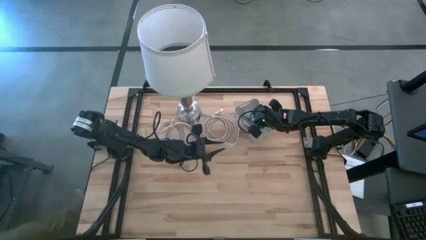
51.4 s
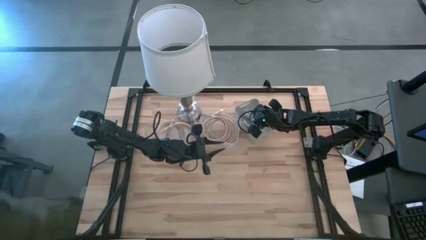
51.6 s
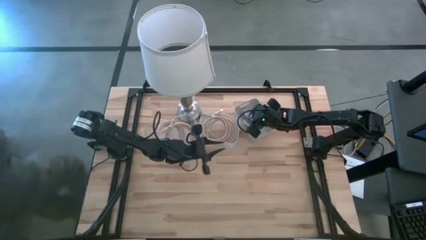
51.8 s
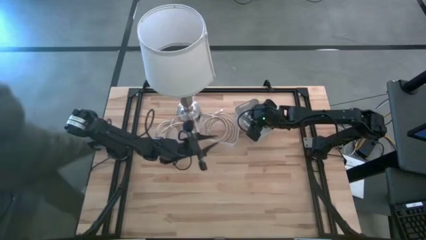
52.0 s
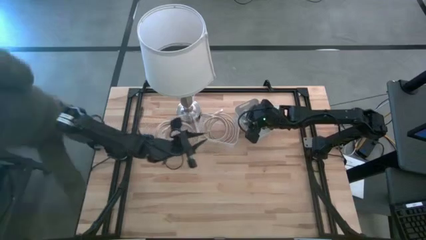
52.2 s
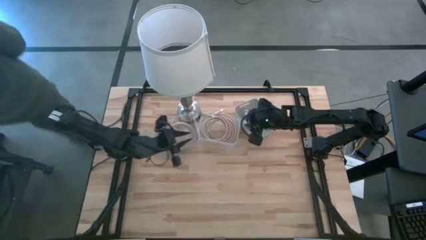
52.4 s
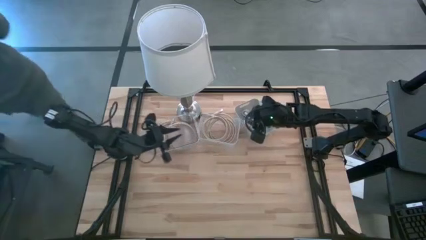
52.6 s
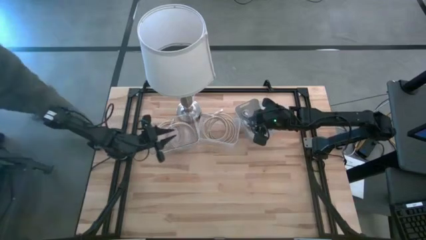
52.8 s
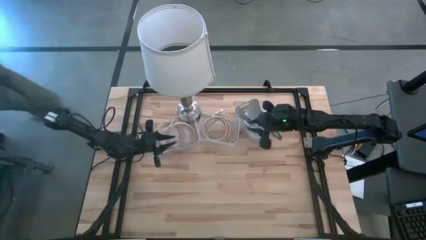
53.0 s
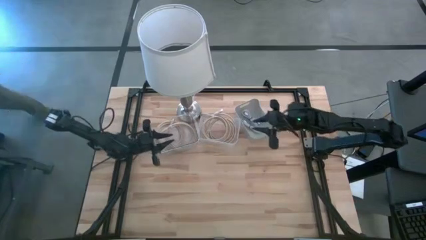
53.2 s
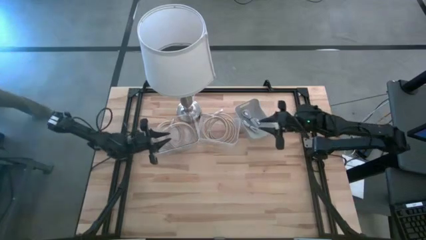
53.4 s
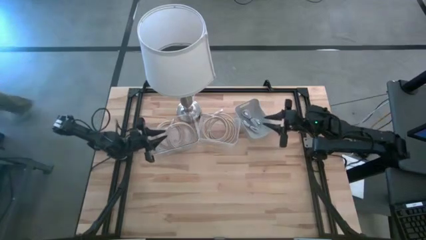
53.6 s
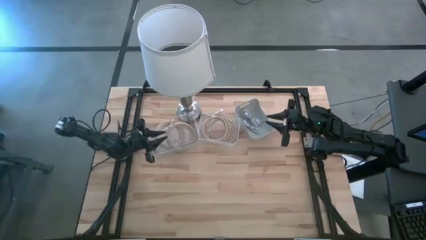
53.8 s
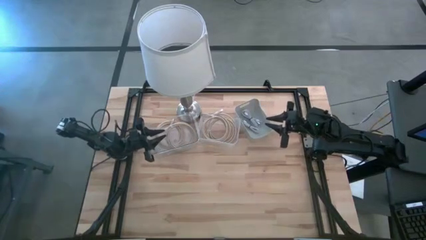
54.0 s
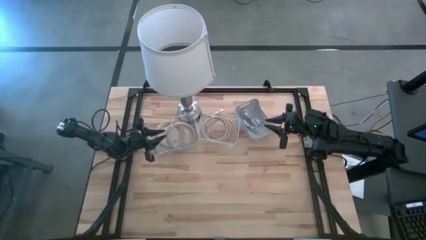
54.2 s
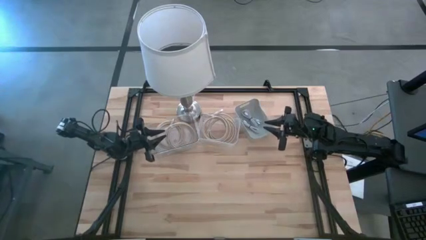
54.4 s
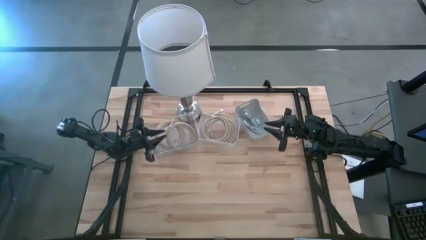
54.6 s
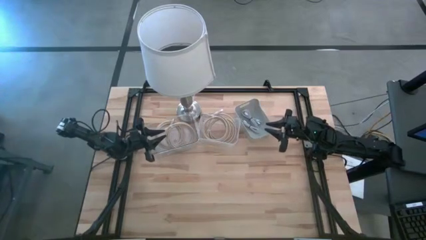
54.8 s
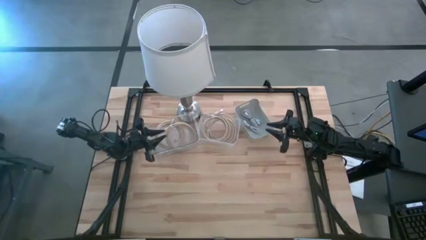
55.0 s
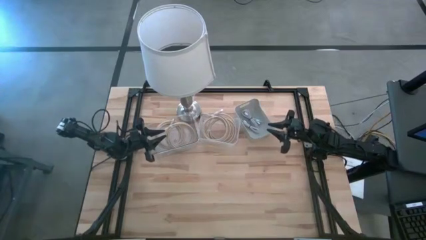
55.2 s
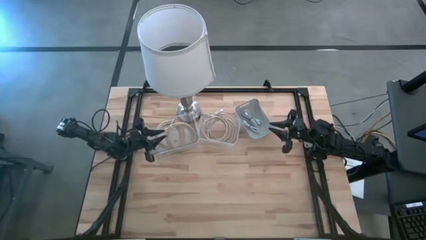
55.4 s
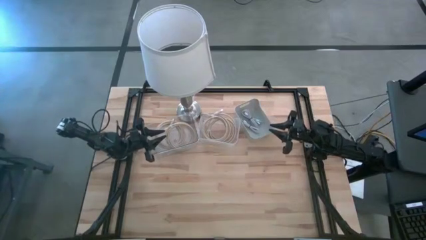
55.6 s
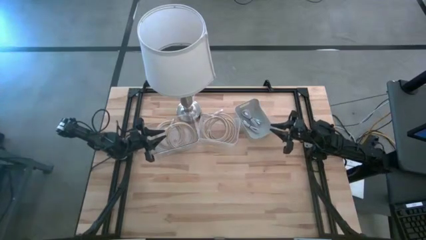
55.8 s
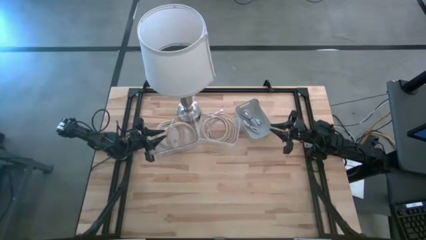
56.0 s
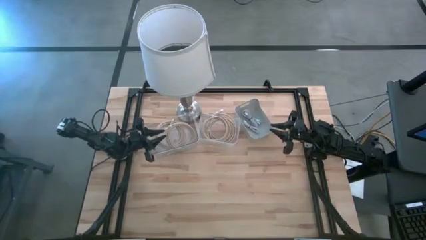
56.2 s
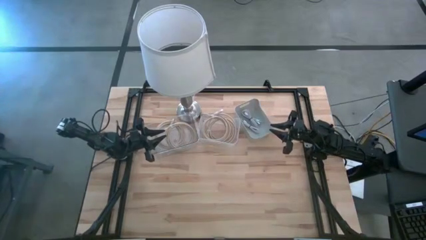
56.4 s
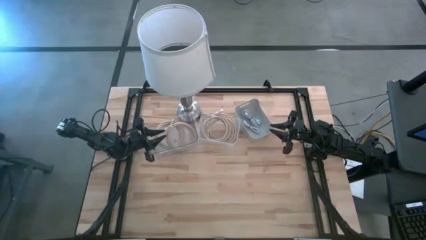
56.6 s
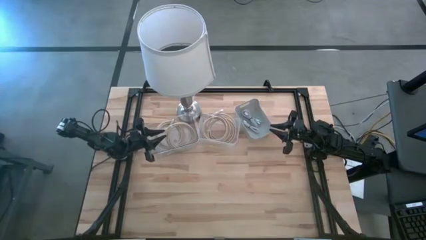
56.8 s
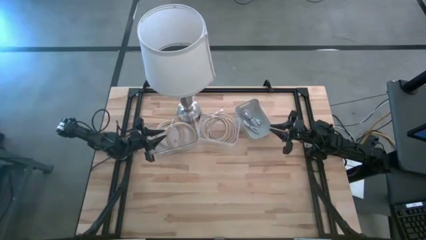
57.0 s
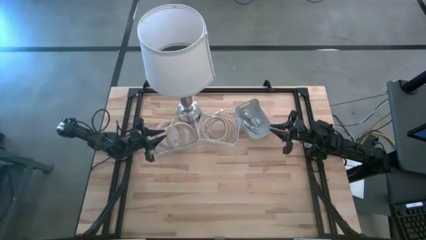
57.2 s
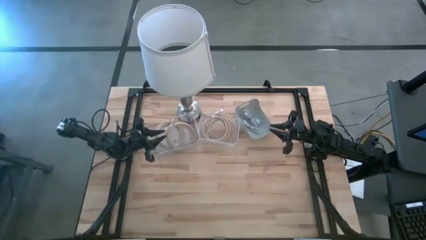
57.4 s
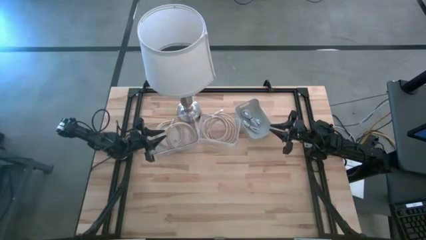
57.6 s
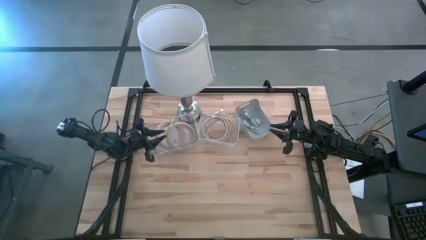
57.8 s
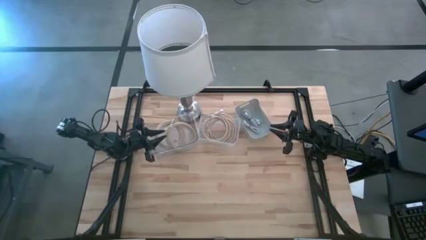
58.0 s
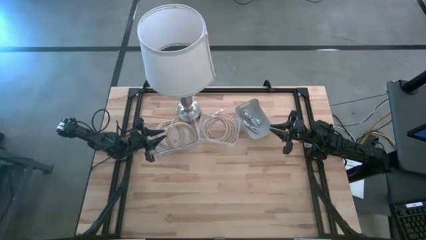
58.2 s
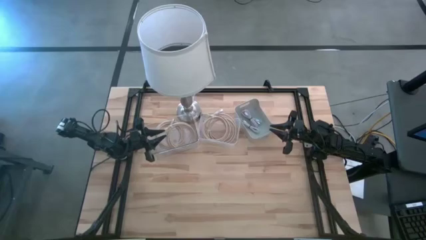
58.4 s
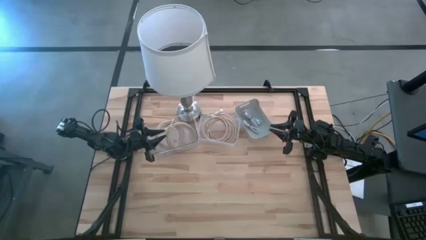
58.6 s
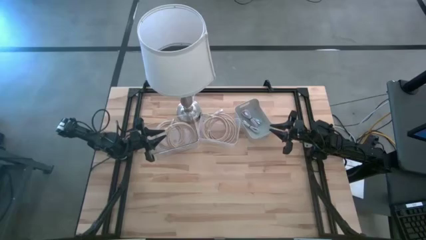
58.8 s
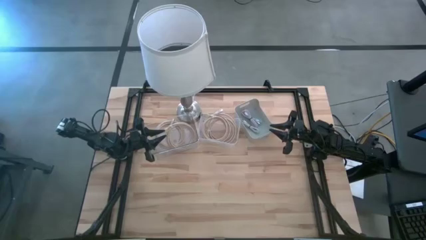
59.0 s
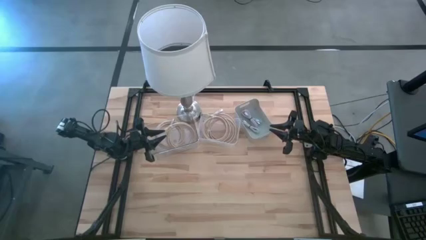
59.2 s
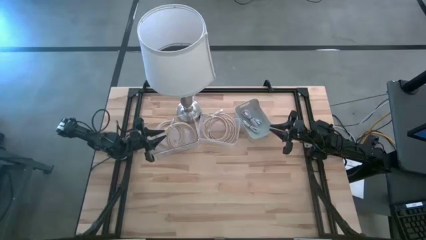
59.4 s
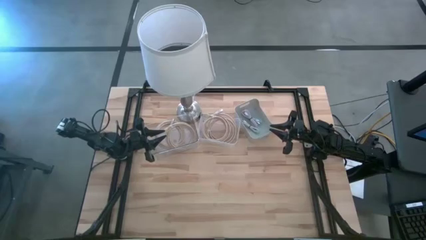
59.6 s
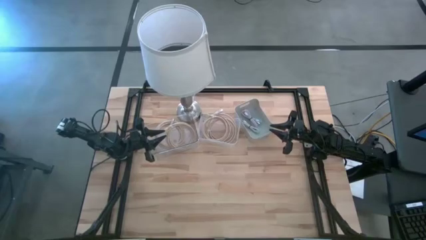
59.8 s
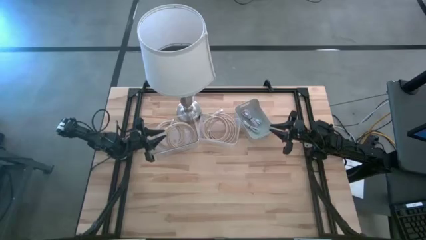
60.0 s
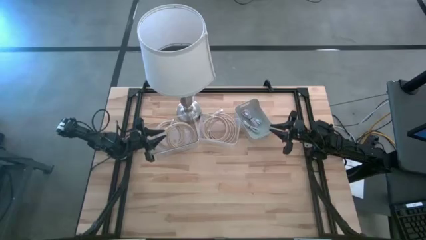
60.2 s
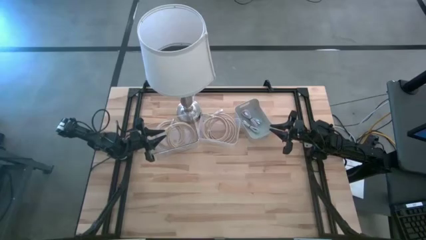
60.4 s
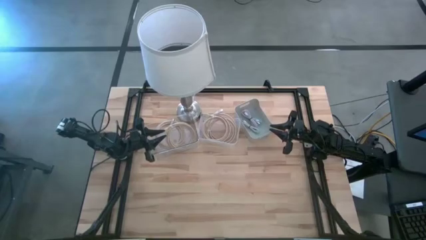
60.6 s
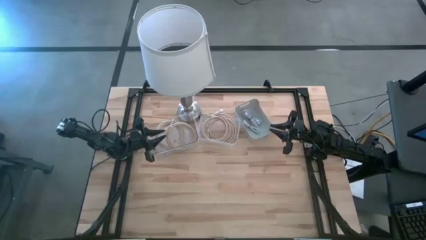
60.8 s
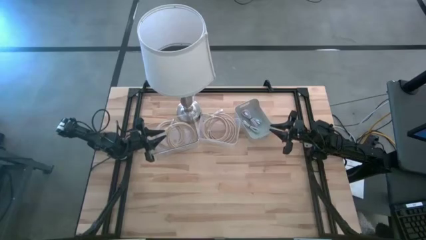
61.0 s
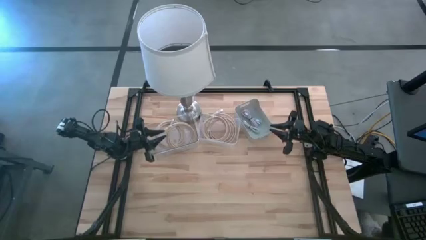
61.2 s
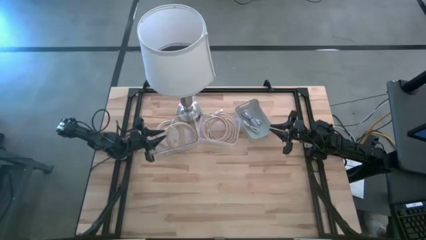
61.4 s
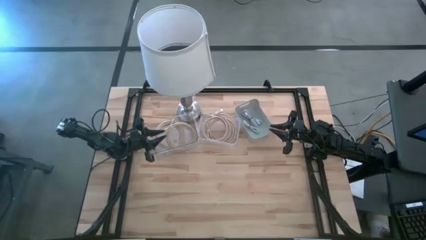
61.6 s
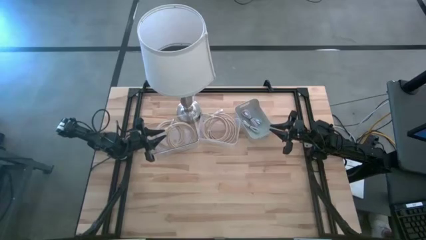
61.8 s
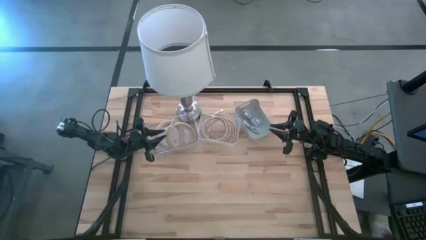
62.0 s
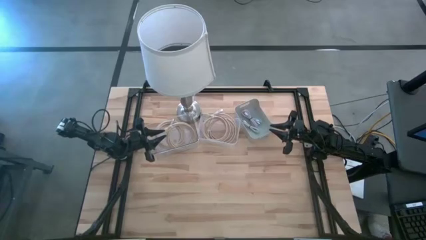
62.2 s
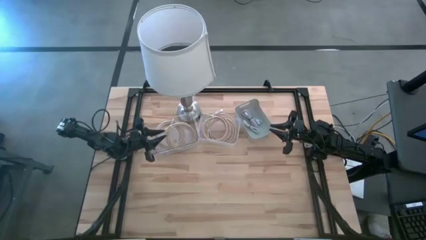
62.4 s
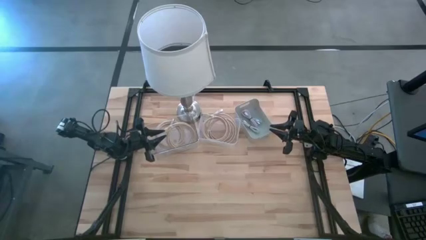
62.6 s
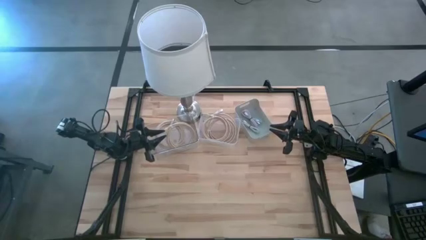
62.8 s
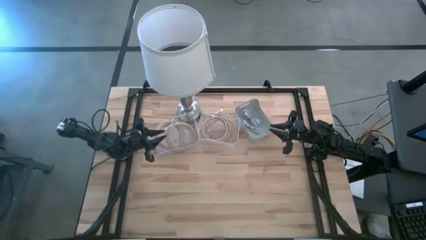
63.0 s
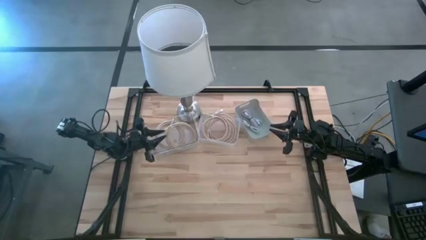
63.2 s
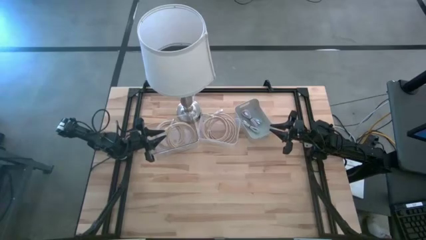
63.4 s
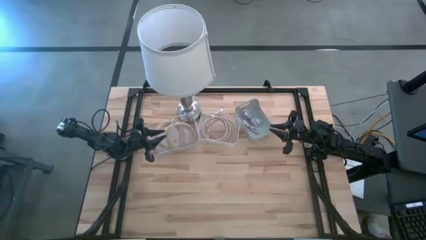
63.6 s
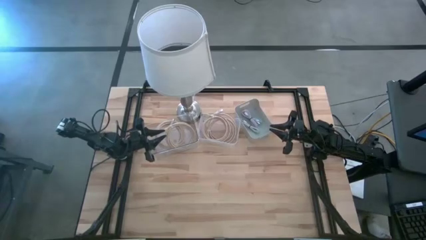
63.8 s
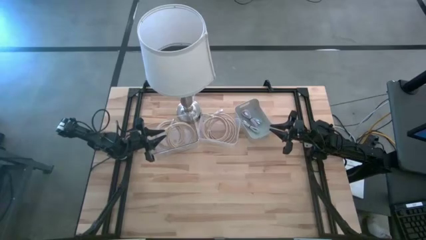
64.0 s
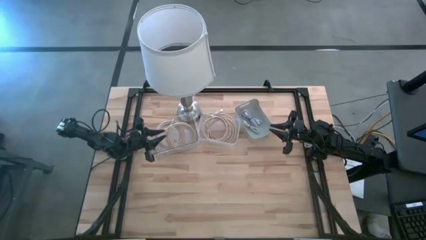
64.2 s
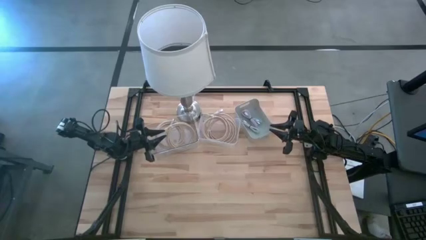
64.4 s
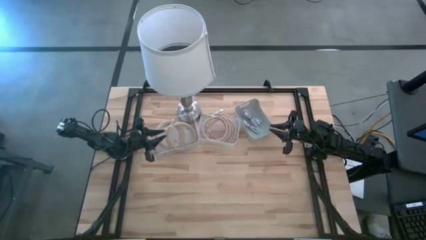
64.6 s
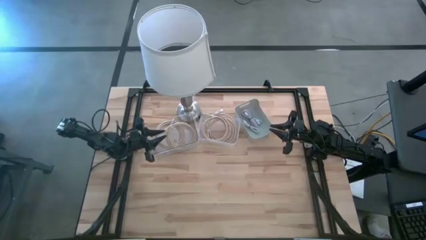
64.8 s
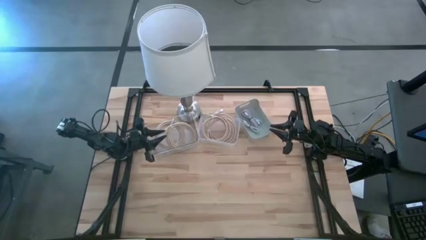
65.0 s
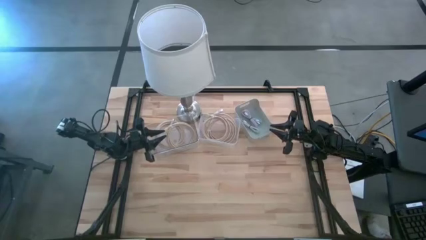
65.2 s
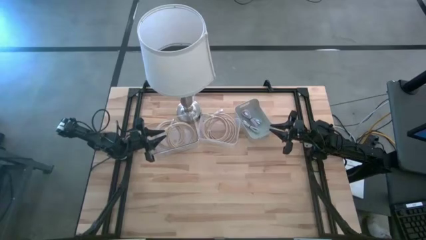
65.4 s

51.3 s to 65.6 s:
Task: Pick & Place USB Port
Return to Home Position

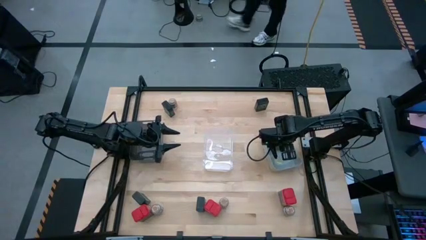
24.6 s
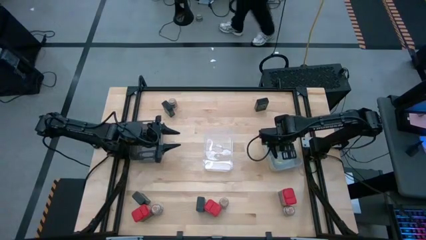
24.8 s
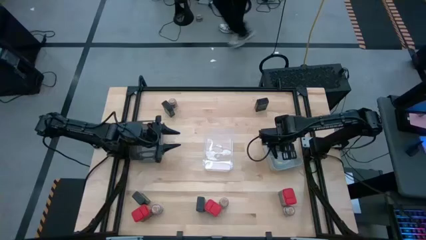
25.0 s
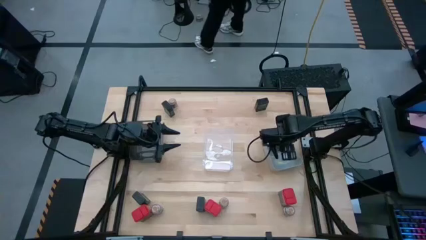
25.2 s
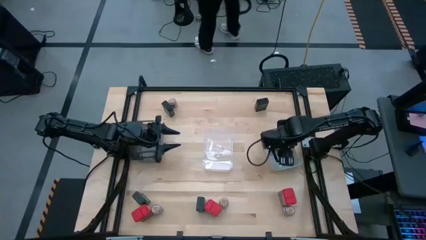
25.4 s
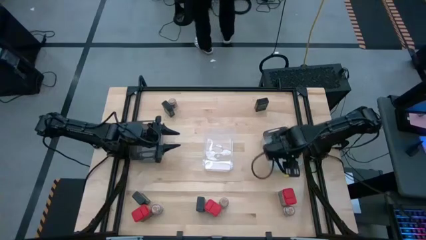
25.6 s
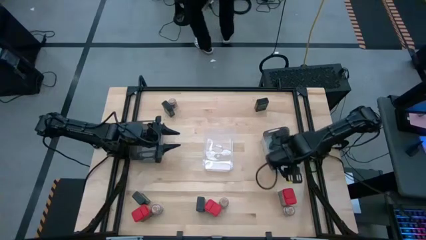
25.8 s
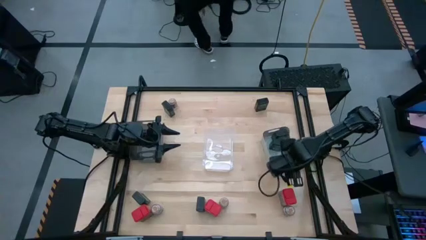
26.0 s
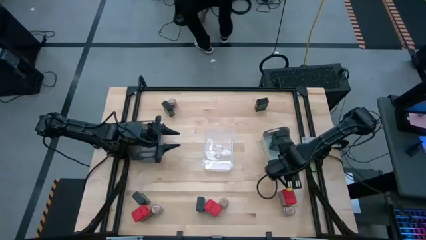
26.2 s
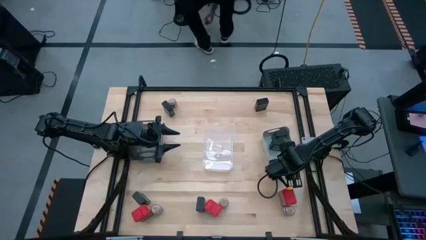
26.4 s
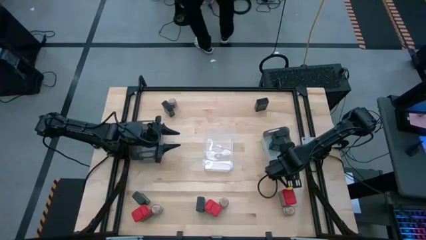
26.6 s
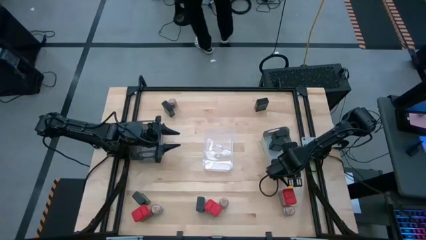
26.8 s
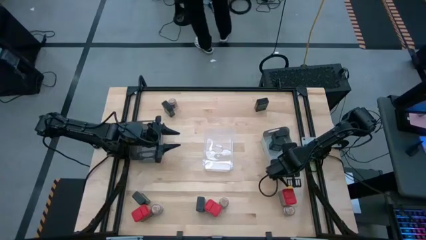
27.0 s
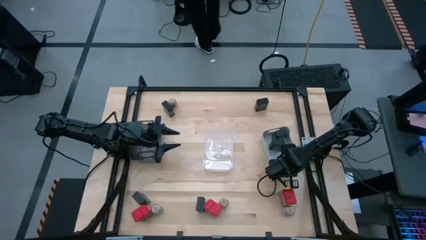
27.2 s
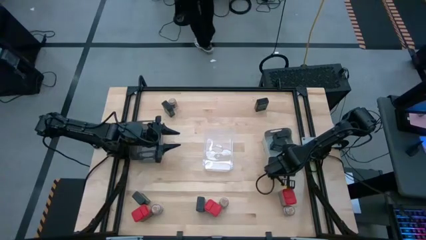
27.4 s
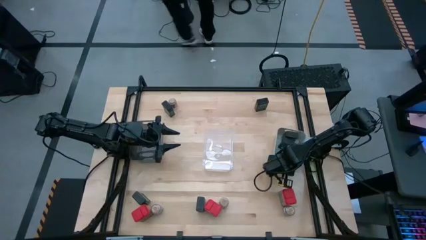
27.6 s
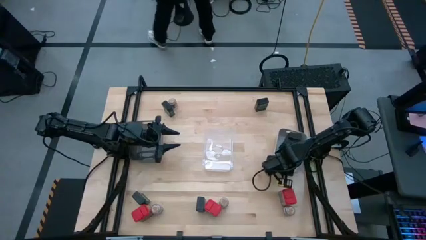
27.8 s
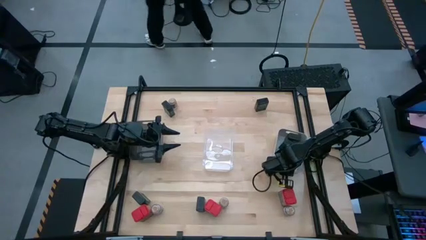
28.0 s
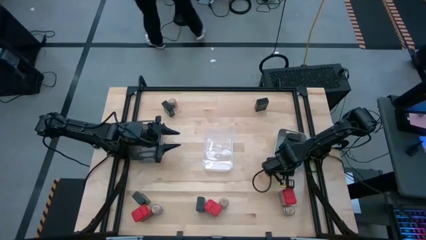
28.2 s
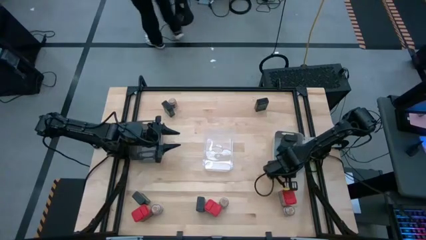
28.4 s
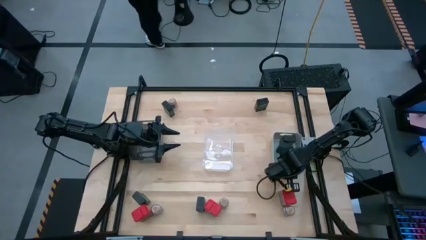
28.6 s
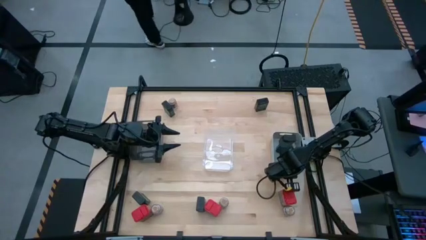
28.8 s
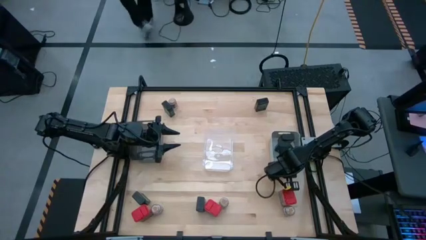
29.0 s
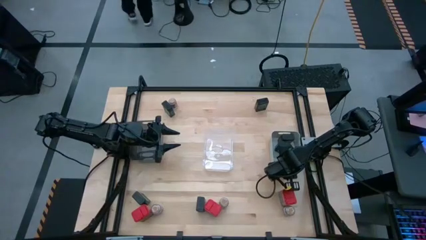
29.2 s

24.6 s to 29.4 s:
Task: Sort spices by type
Adjust the gray bin on the table
